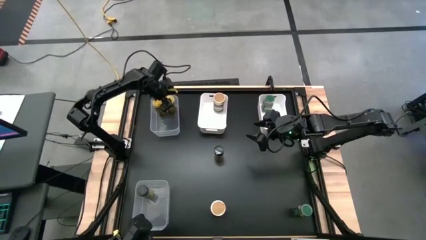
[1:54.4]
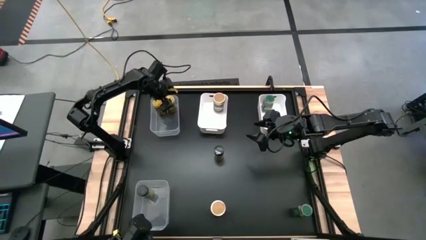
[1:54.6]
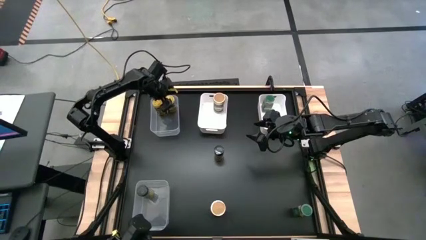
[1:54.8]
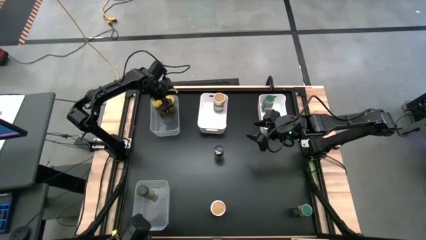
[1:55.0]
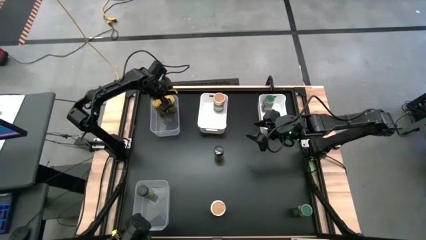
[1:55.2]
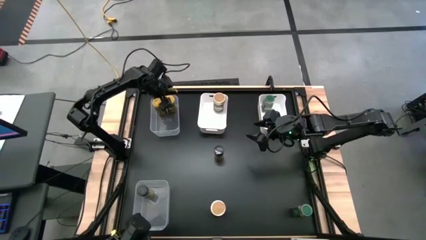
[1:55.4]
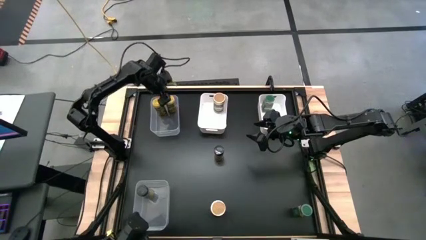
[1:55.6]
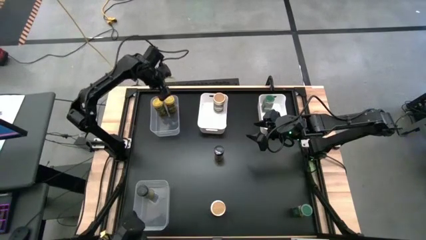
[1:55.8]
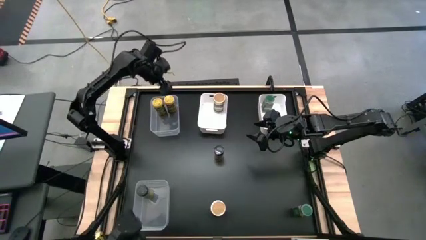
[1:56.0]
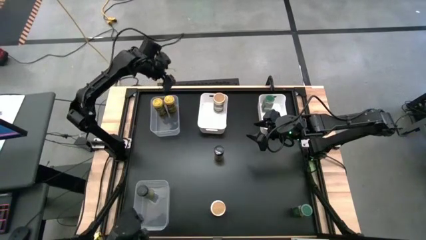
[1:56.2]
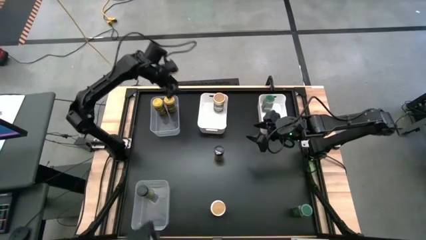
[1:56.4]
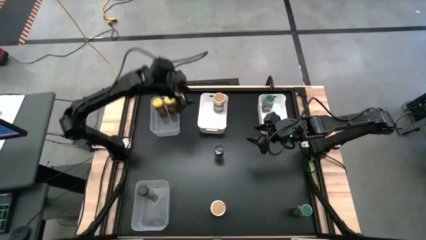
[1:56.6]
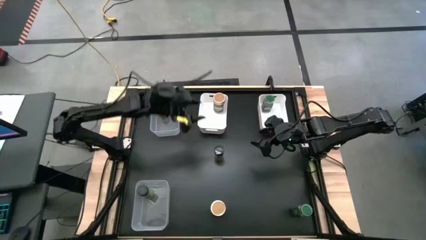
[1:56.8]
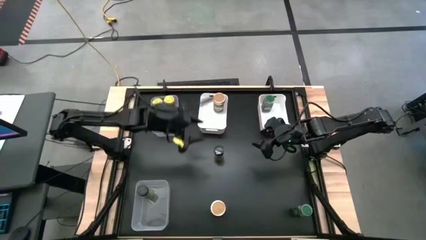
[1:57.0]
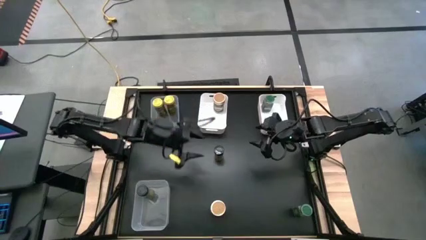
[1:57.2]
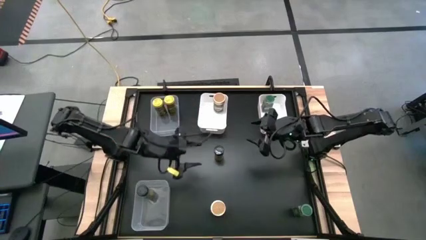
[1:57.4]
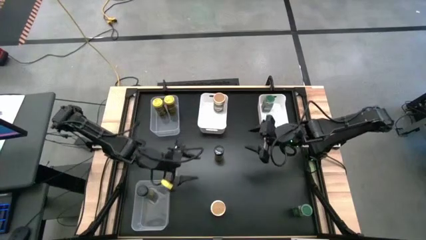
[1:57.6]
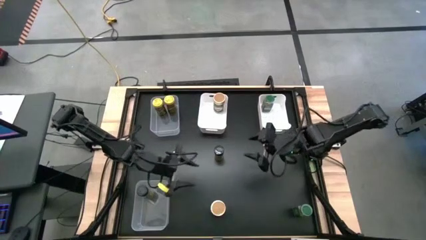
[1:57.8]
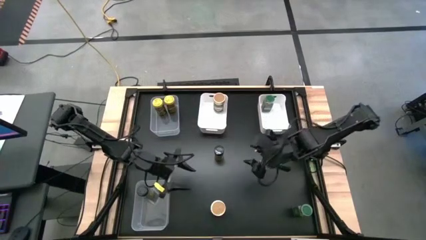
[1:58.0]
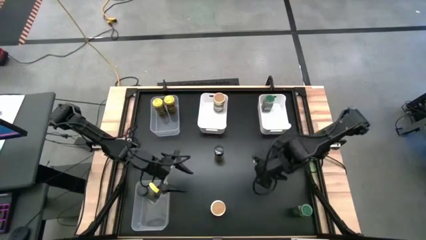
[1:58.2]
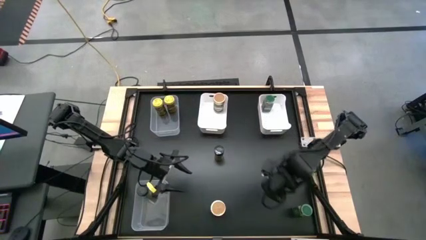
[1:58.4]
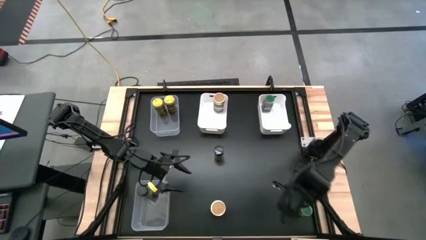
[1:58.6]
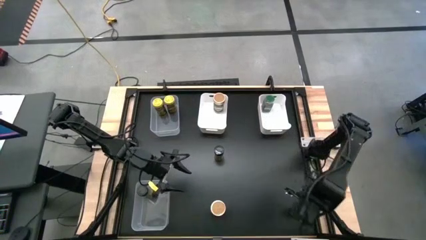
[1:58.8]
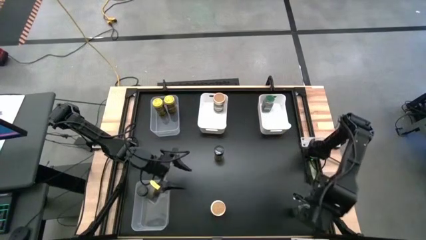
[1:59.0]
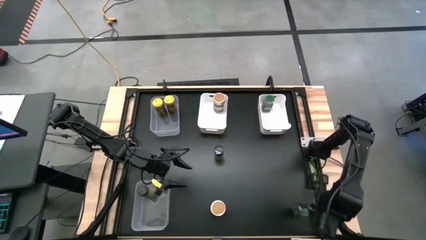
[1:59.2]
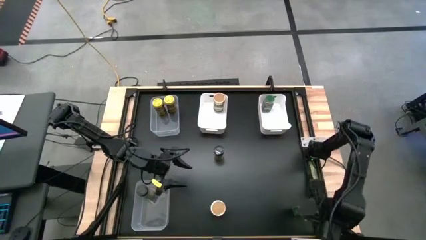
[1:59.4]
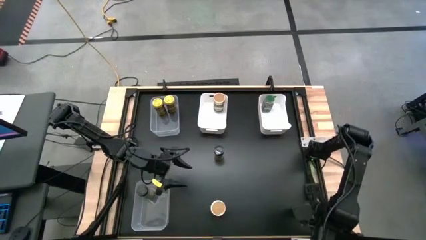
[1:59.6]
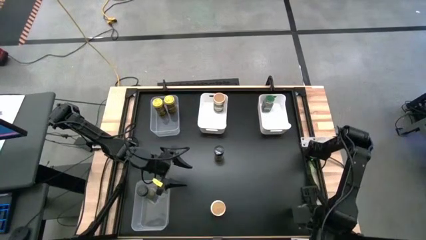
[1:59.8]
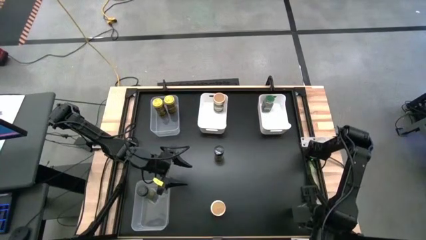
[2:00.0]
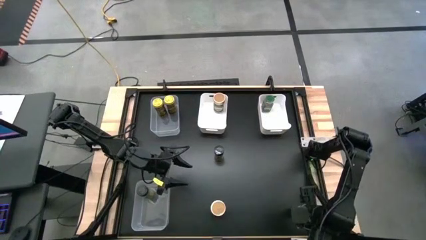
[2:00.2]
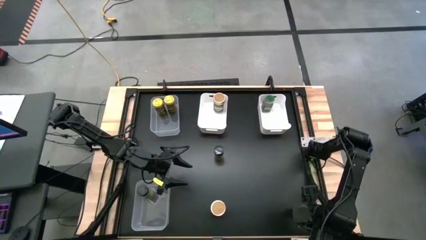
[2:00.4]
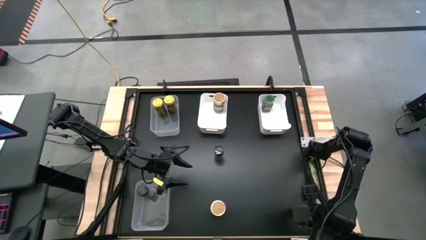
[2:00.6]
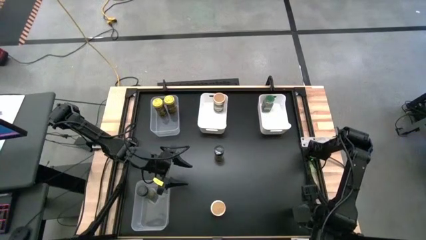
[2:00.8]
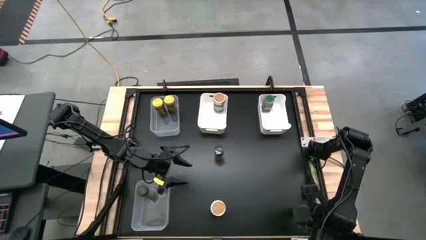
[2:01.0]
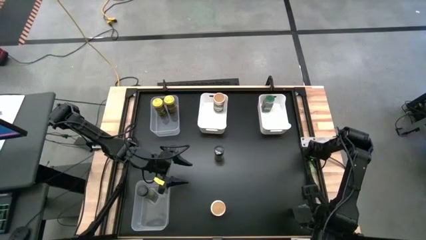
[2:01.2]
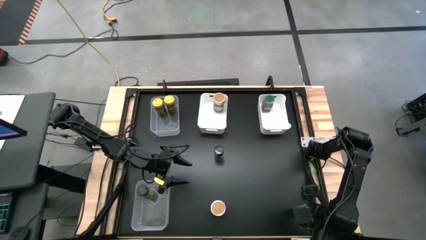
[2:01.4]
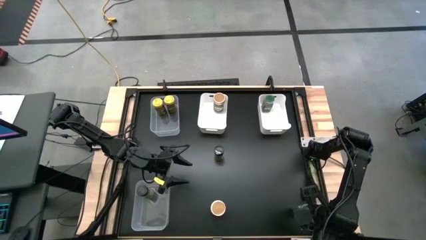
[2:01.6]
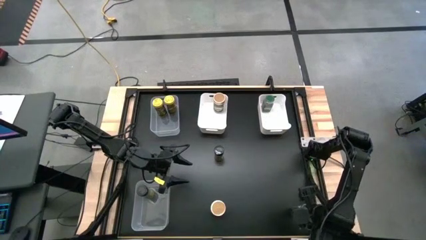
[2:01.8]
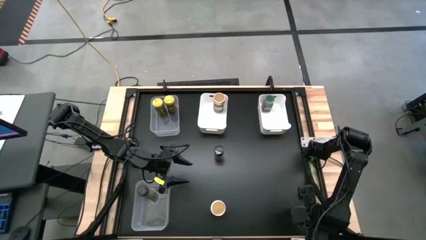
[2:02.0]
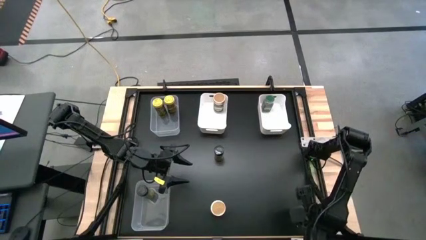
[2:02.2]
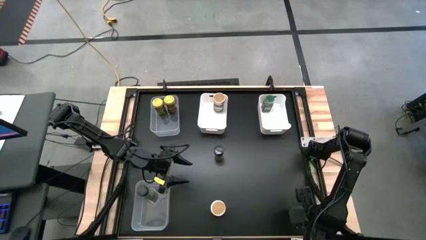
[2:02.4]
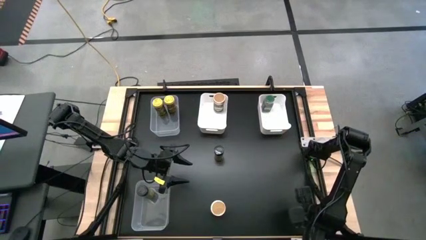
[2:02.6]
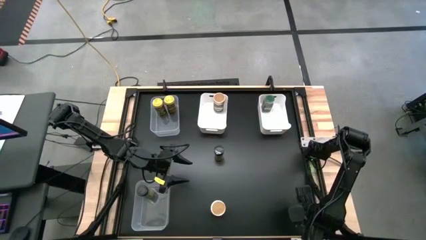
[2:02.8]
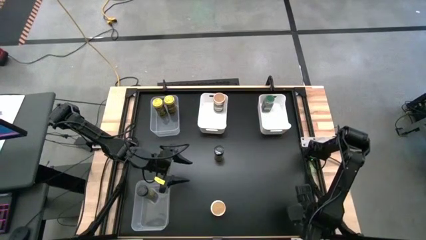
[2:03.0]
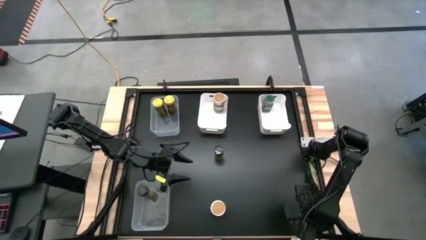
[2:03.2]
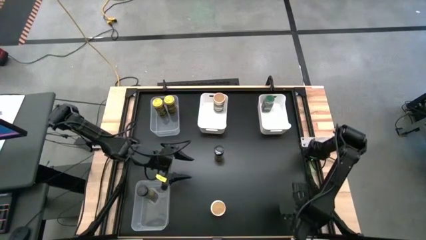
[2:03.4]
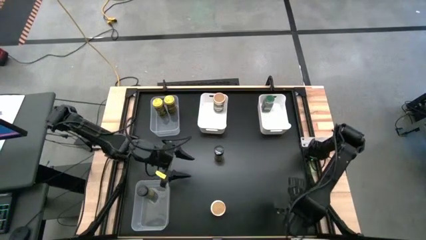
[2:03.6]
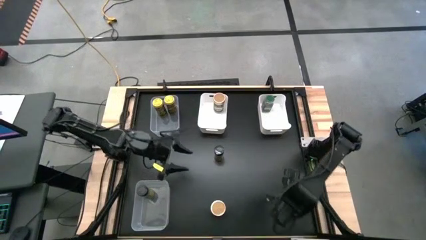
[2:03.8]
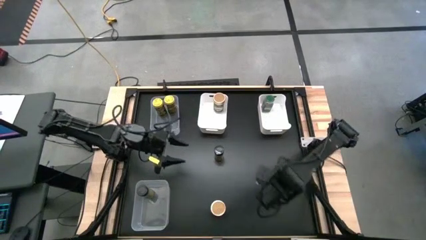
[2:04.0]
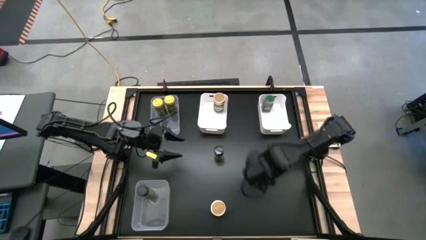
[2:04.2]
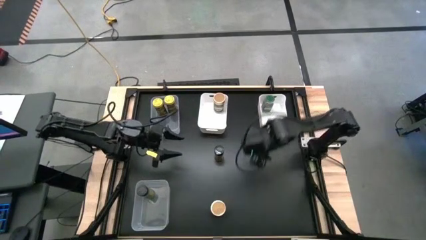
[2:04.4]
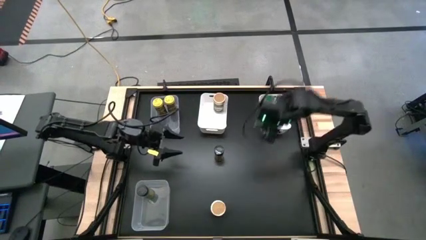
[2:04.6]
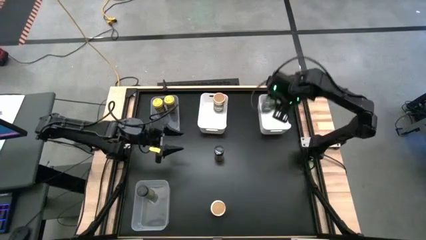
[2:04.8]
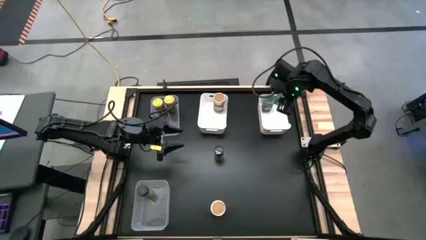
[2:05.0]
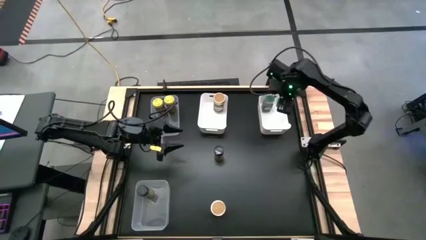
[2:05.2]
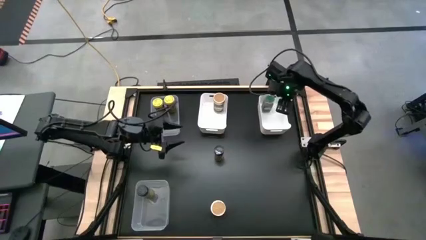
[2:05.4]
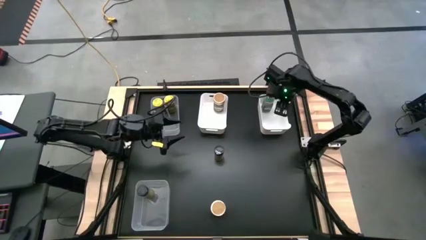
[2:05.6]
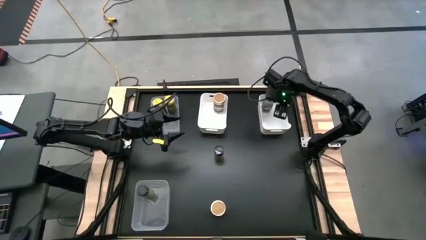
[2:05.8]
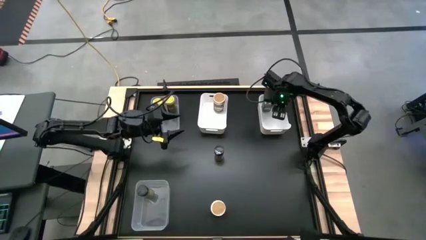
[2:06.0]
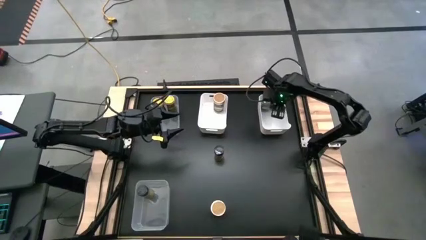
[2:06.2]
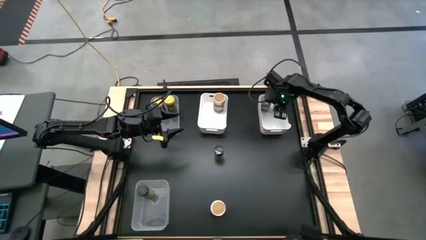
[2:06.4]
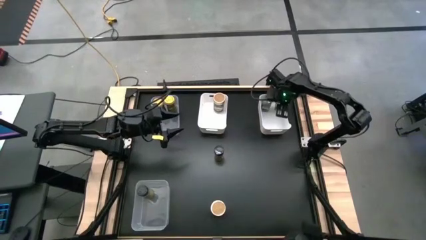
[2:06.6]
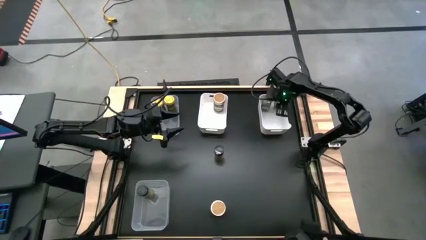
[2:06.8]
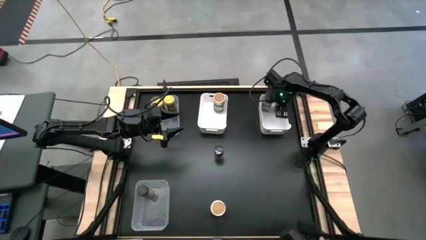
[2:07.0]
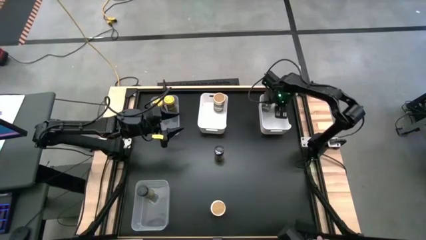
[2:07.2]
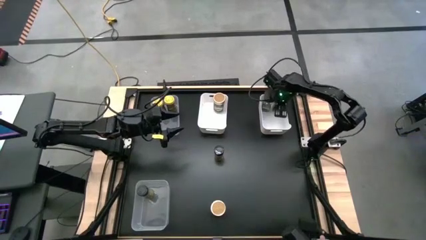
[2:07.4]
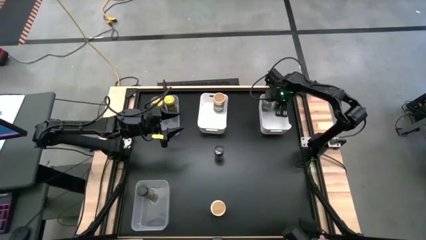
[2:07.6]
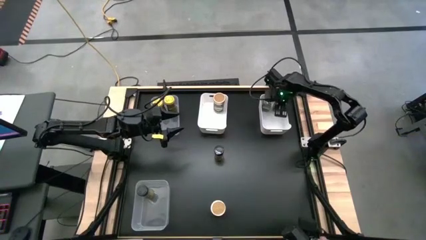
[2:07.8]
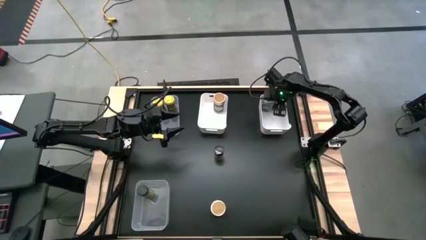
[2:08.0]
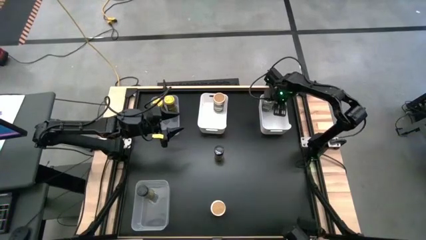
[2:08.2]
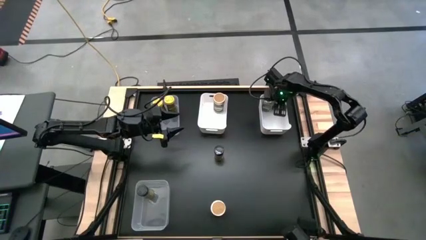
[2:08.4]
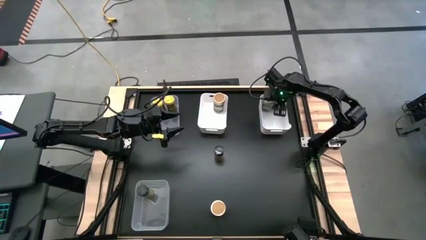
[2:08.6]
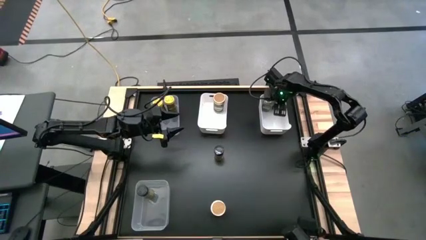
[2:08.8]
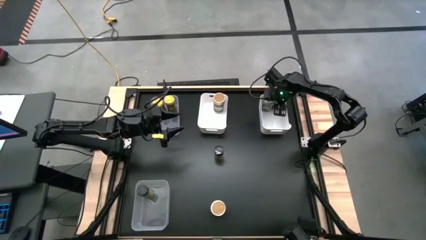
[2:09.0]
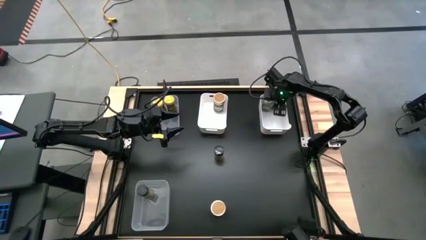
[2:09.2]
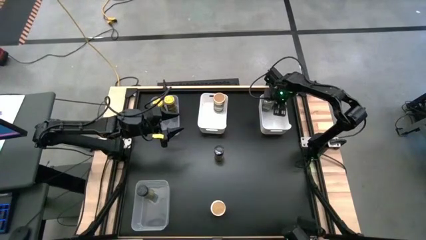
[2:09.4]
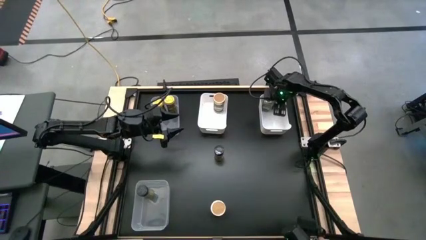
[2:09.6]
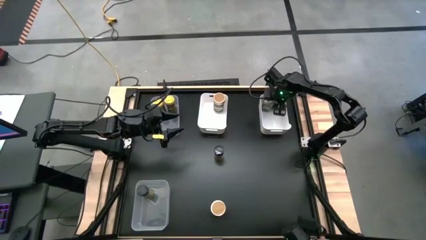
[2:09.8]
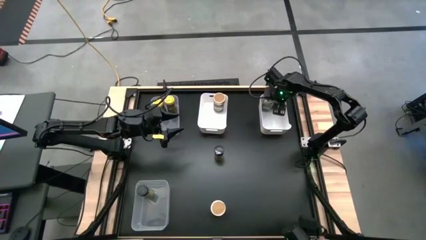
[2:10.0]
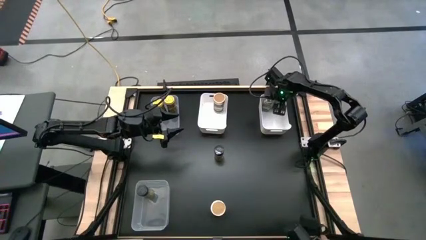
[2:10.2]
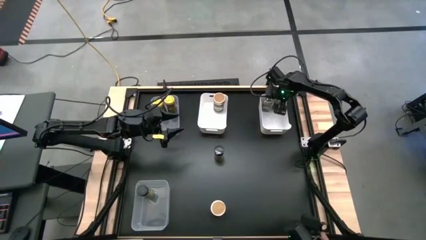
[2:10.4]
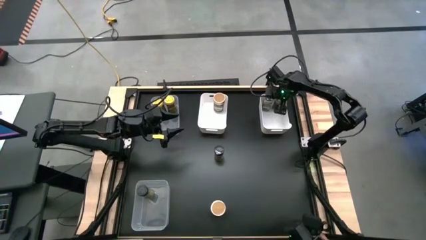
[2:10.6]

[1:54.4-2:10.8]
Task: Sort spices by type
Put the green spice bottle into the right white bin
